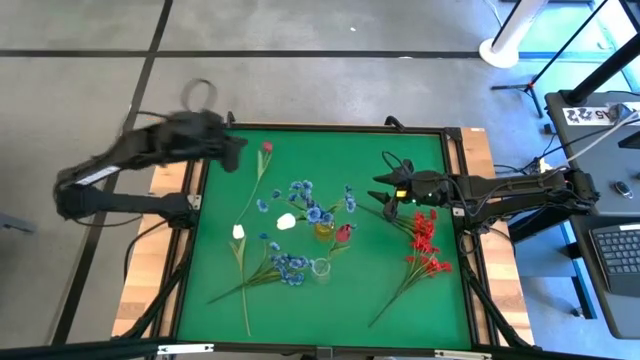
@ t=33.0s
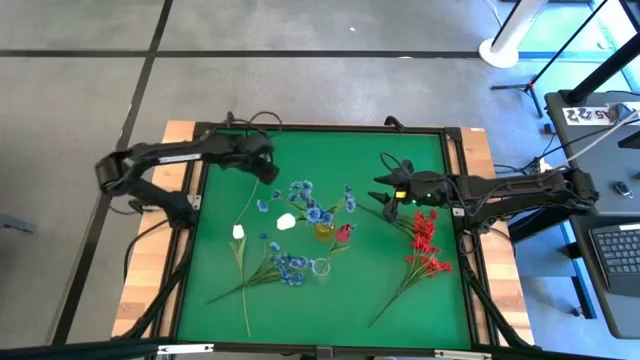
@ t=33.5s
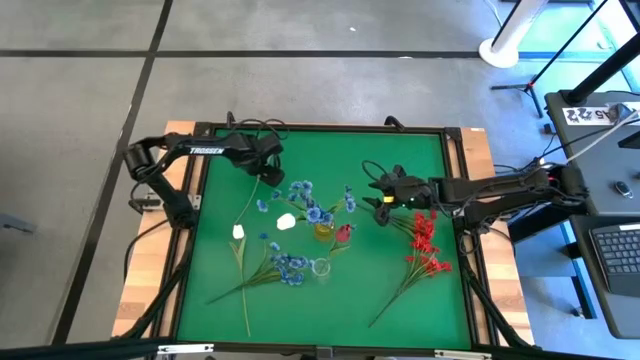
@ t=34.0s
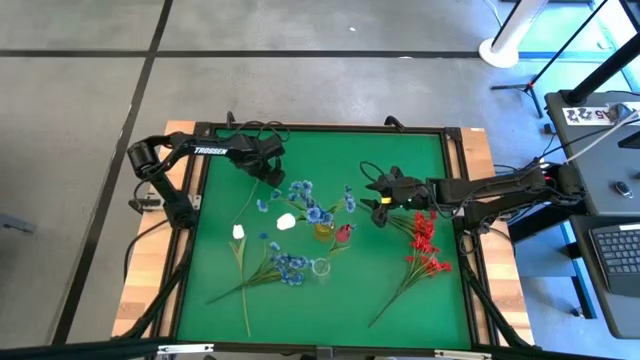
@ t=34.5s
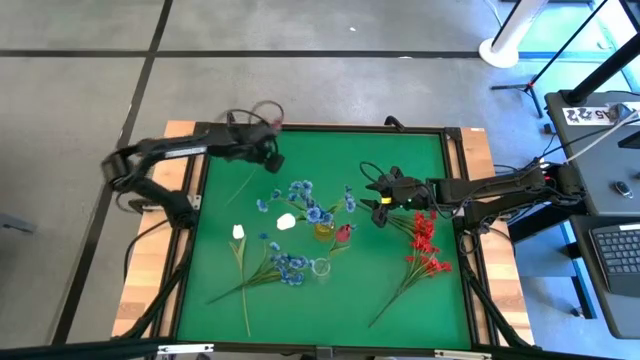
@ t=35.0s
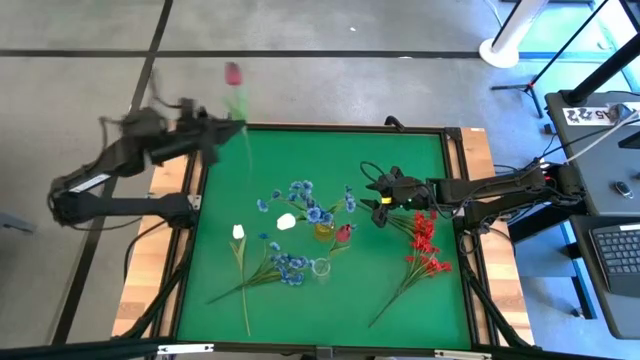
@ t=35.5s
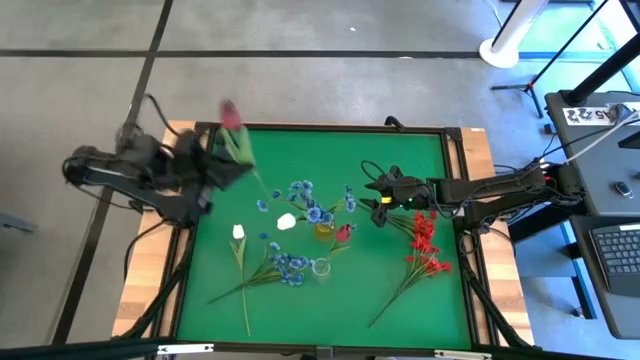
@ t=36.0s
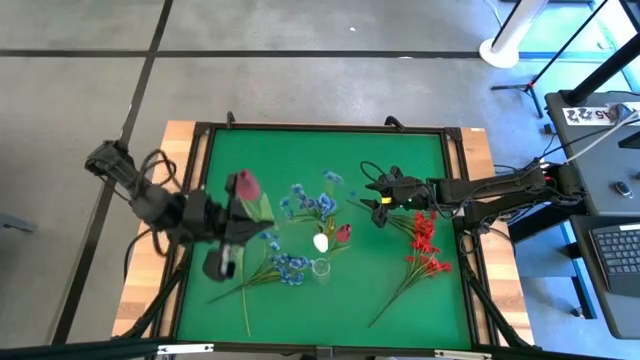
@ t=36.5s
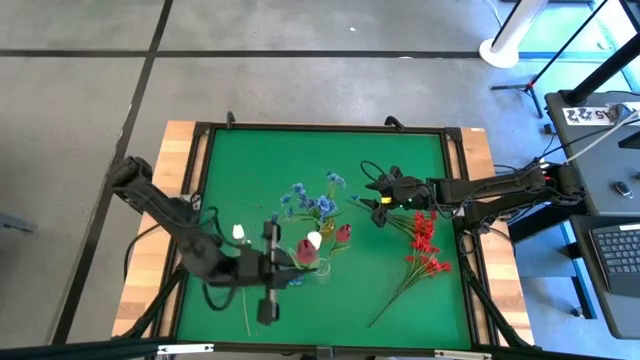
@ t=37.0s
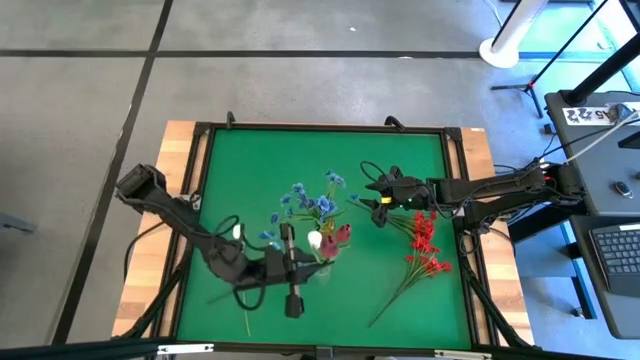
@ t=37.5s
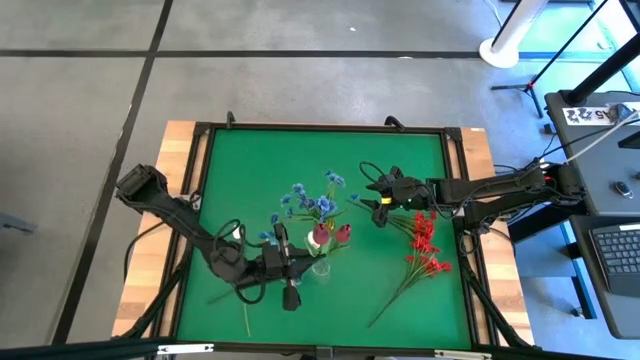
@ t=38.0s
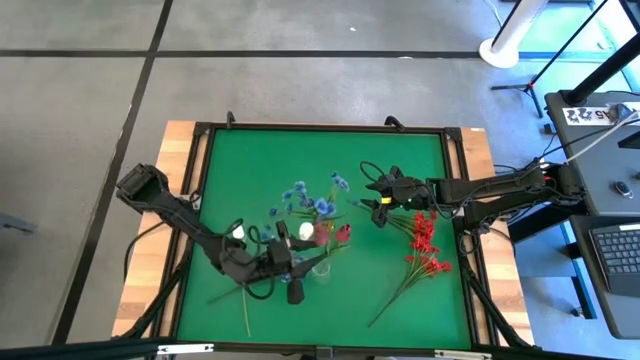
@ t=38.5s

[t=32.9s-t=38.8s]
Task: Sort flowers into vase by color
Put the pink flower into the transparent flower vase

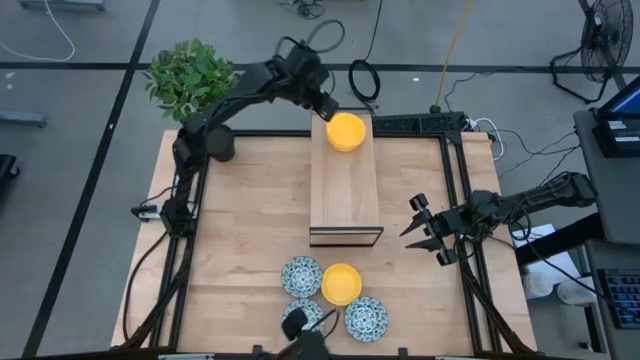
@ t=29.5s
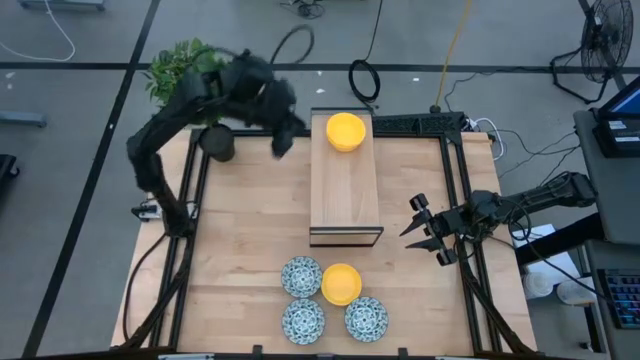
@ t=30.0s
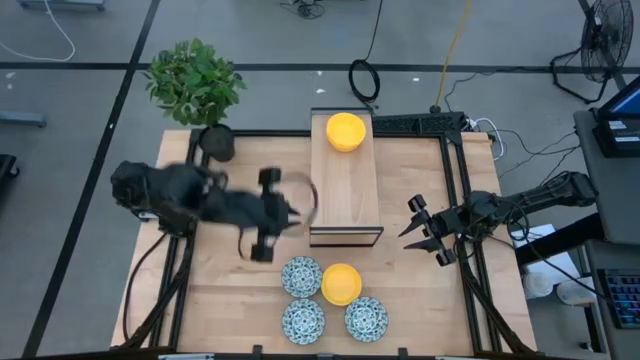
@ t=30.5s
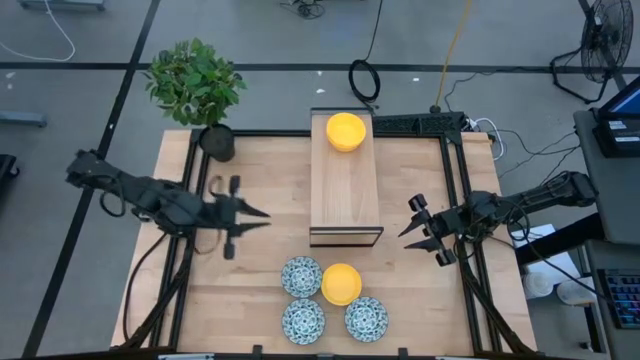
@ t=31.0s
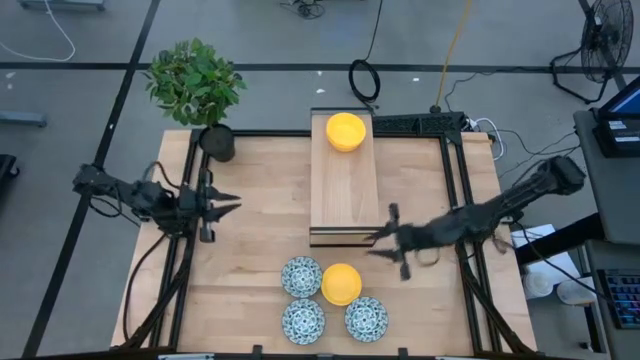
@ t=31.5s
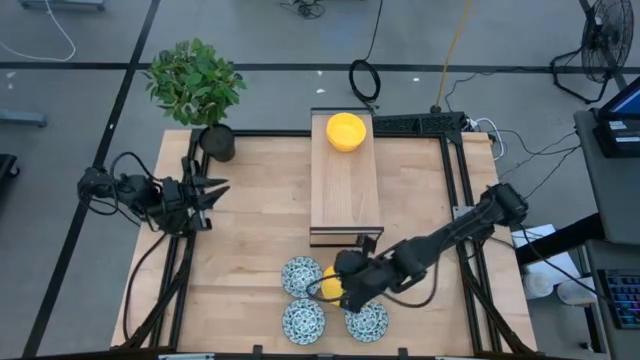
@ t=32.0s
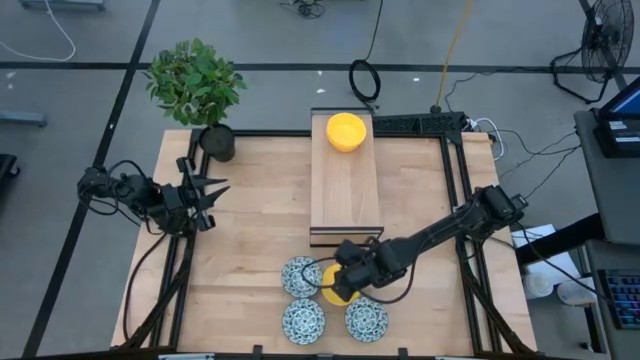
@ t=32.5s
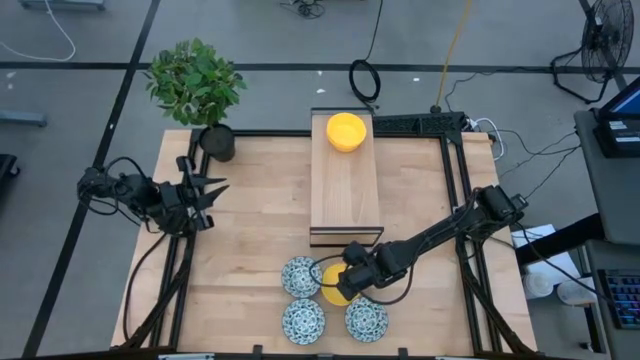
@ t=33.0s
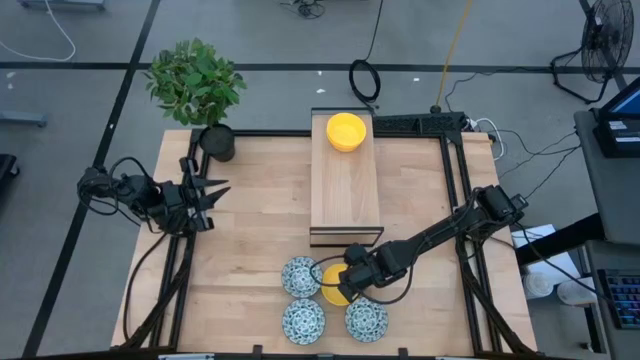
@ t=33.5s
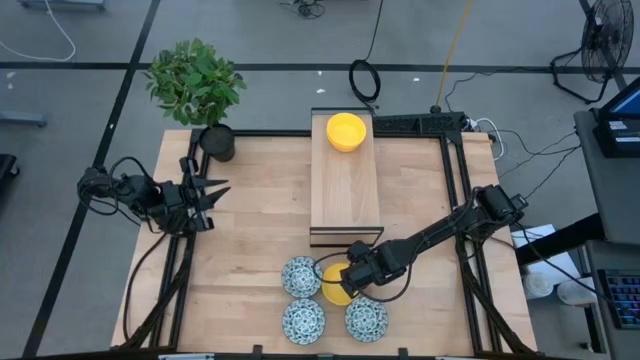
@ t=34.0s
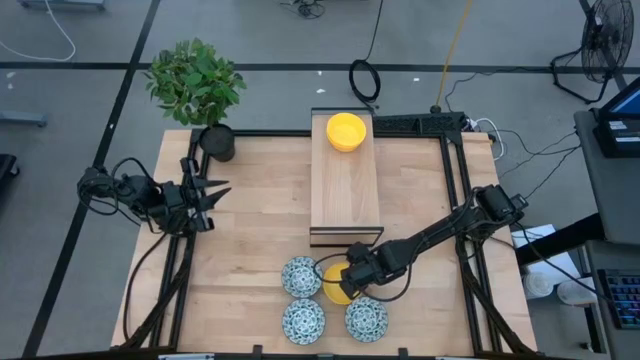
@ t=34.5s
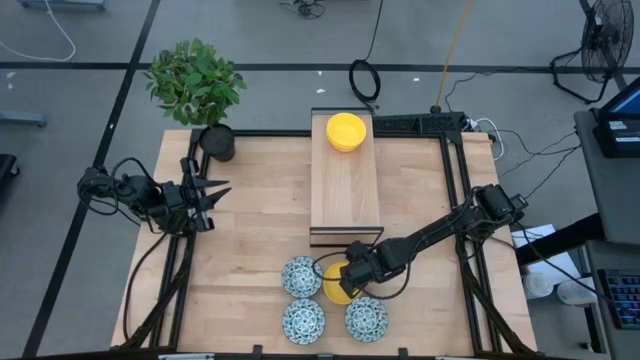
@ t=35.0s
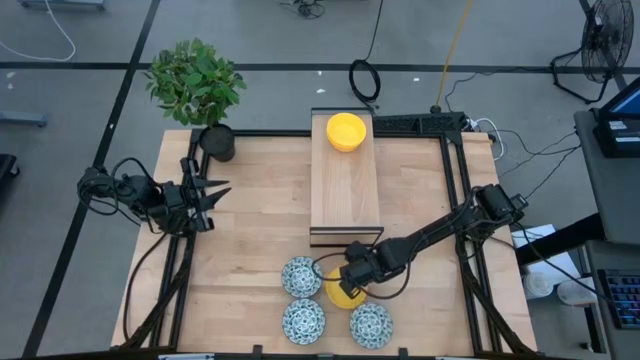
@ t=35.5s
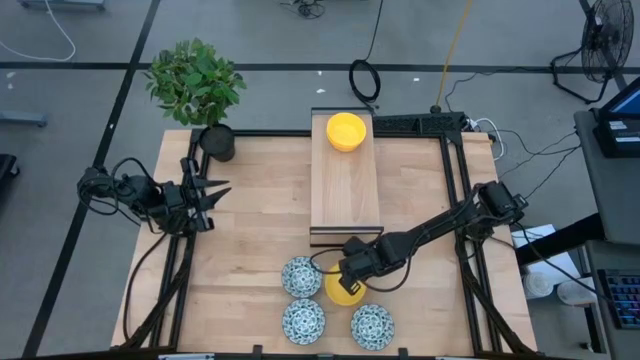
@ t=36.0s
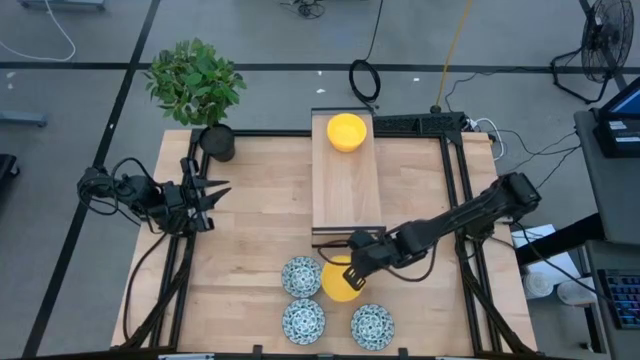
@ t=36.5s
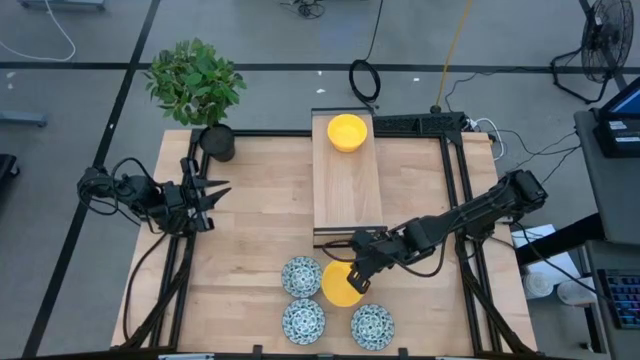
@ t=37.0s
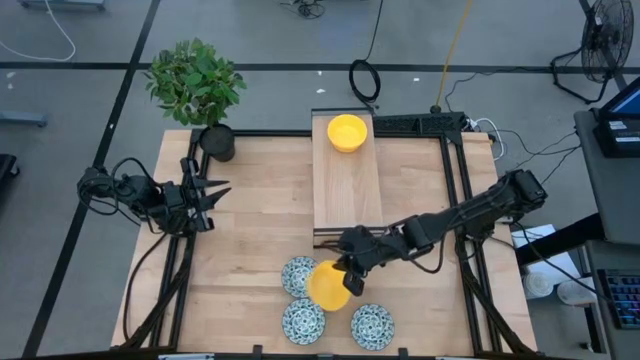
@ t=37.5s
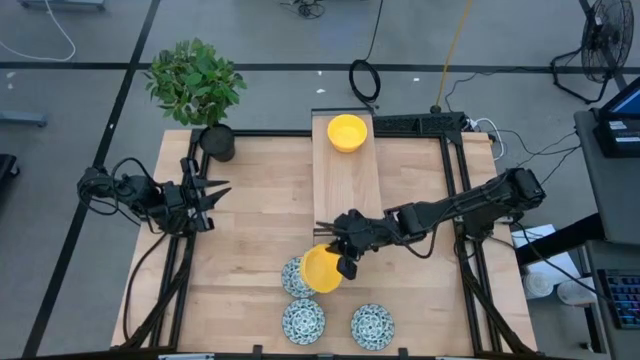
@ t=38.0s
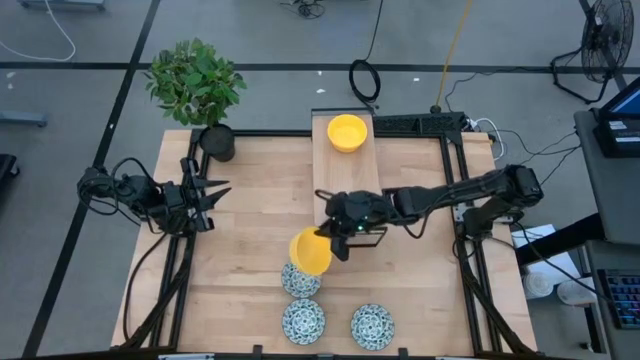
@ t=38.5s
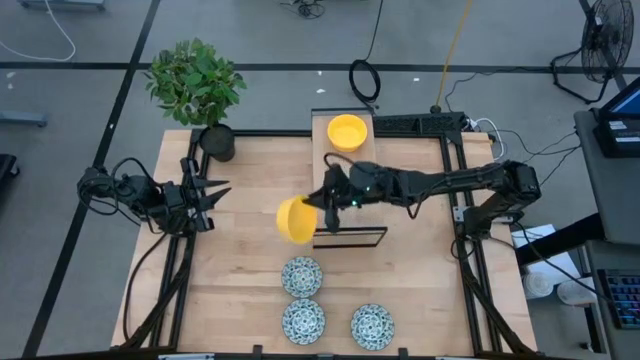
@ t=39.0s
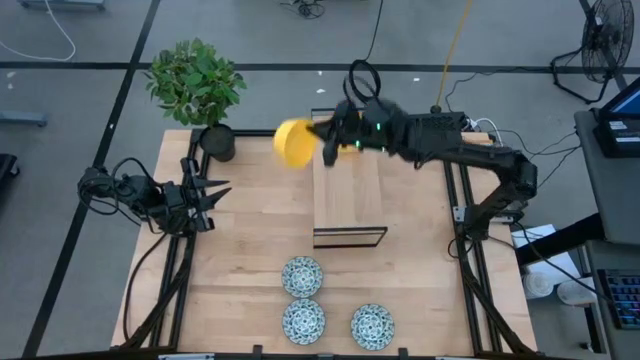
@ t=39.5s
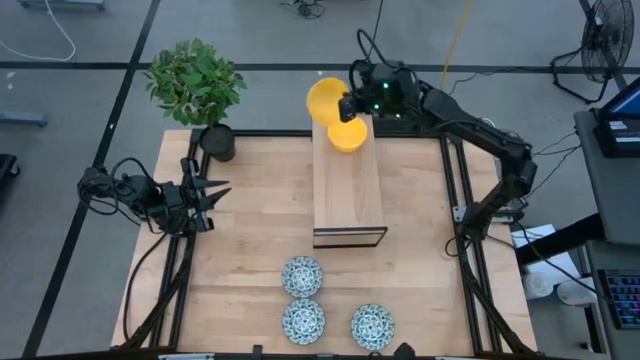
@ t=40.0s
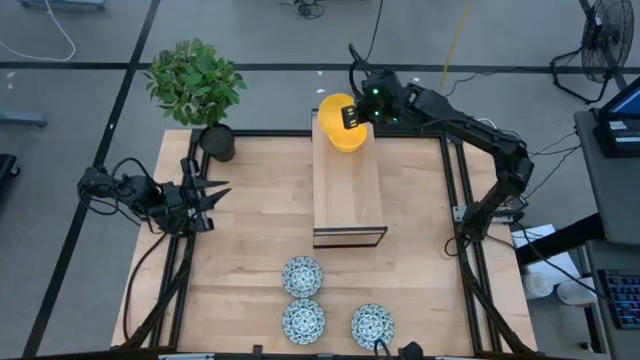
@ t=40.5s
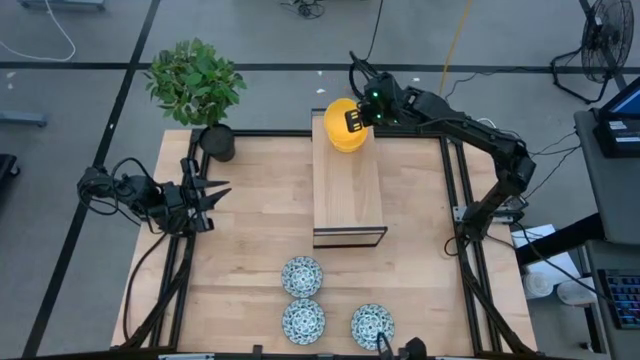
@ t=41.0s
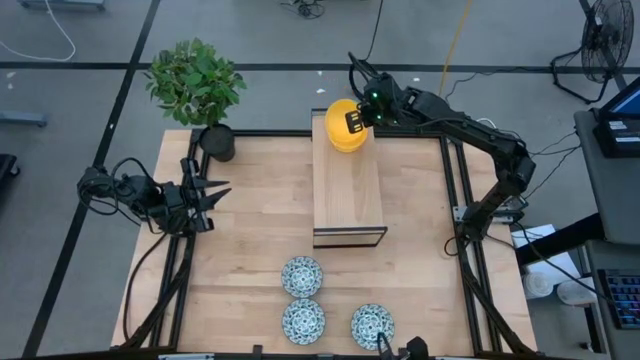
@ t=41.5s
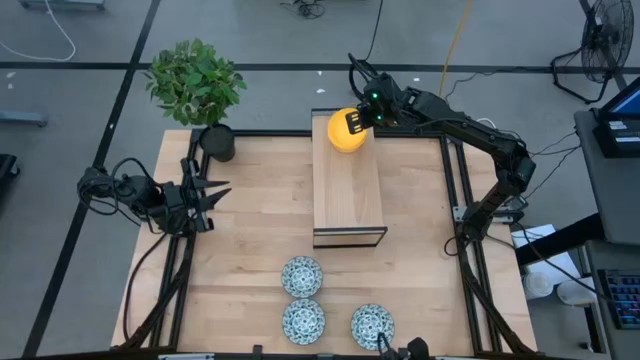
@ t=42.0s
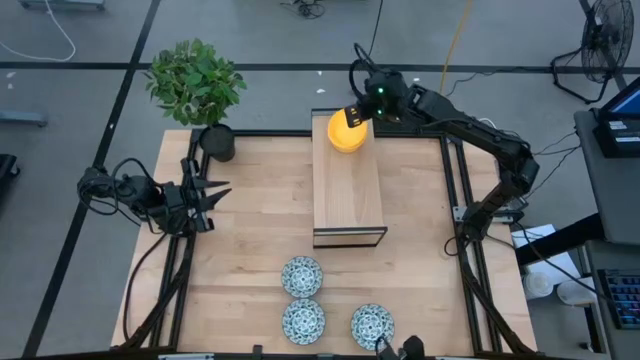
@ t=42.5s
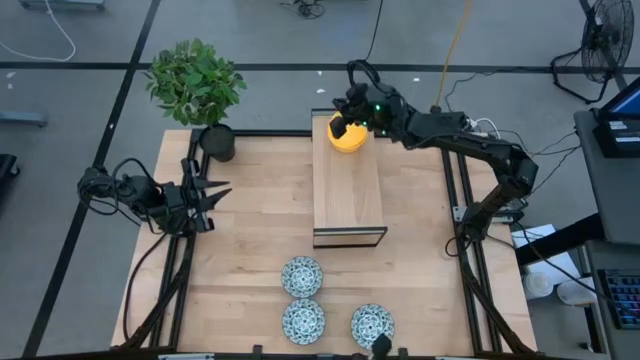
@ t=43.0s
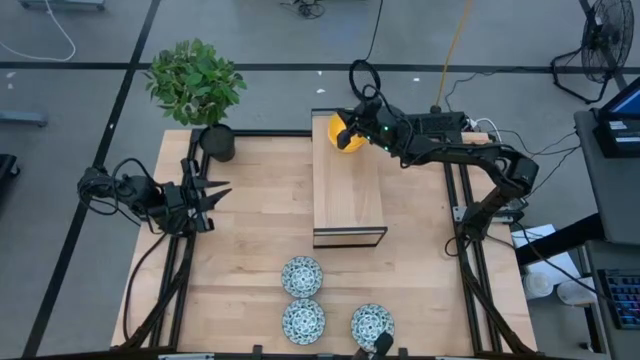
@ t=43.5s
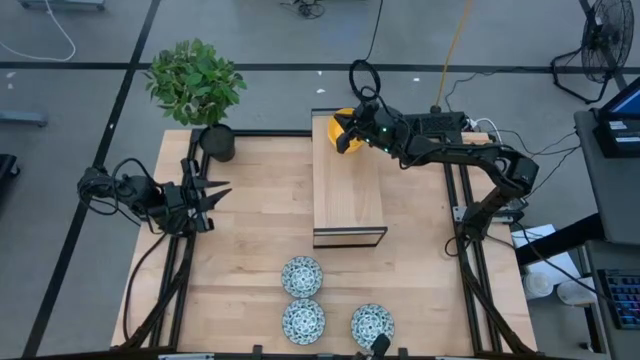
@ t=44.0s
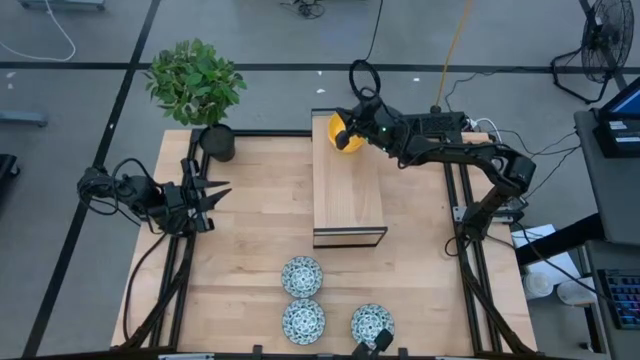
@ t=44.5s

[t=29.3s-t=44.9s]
Task: Pick & Place Mini bowls
Stack the yellow bowl on top of the yellow bowl on the shelf
